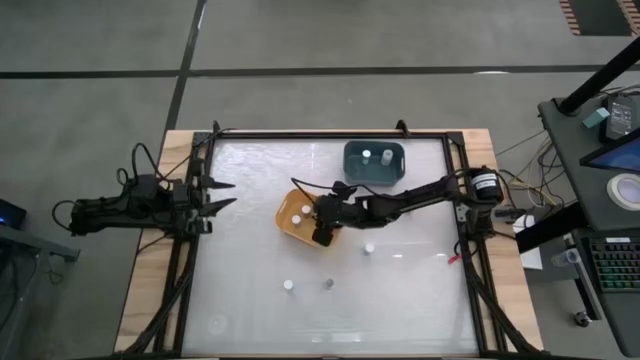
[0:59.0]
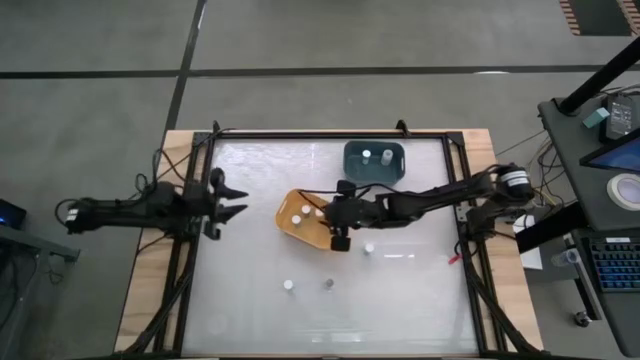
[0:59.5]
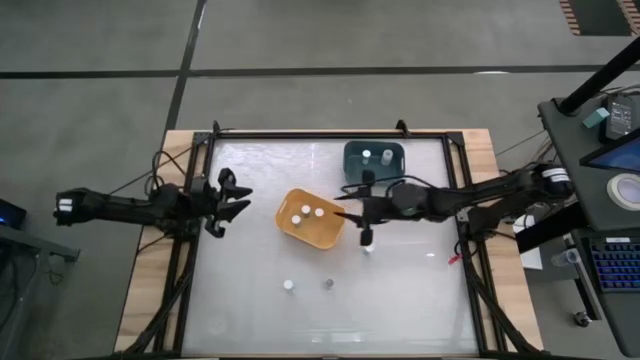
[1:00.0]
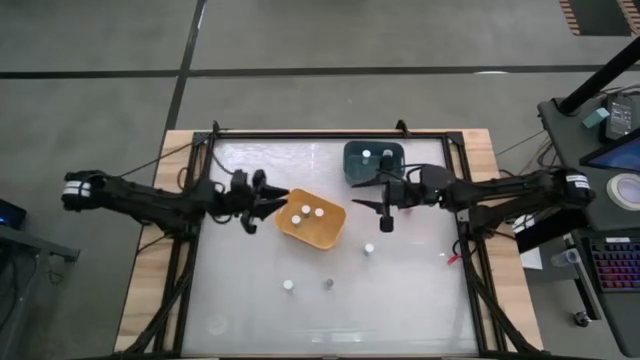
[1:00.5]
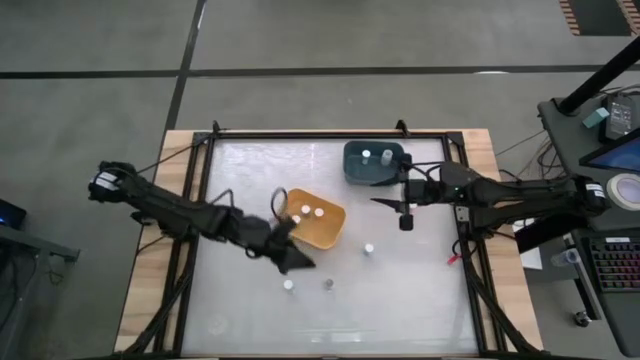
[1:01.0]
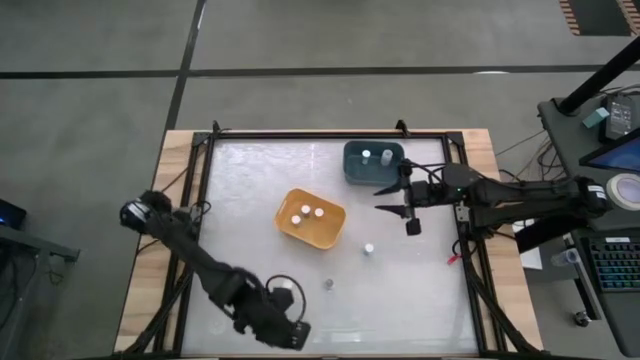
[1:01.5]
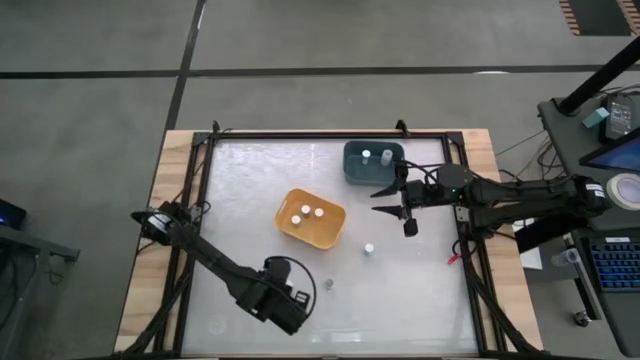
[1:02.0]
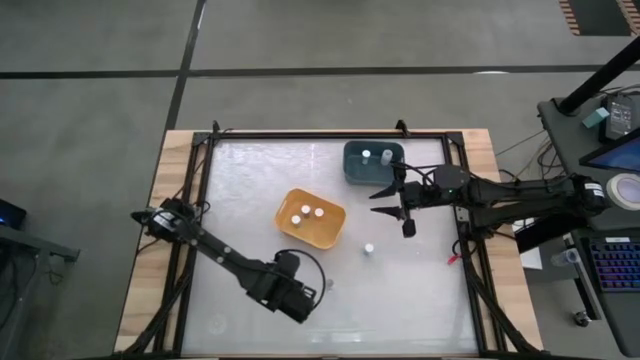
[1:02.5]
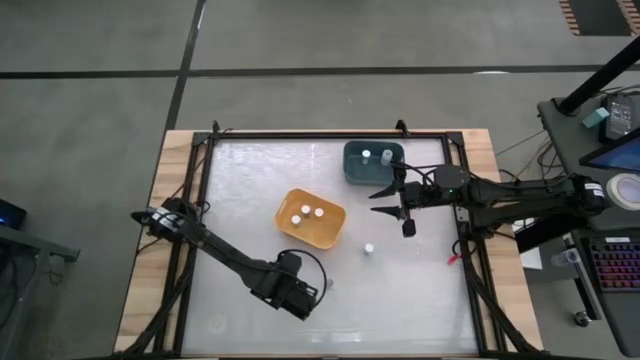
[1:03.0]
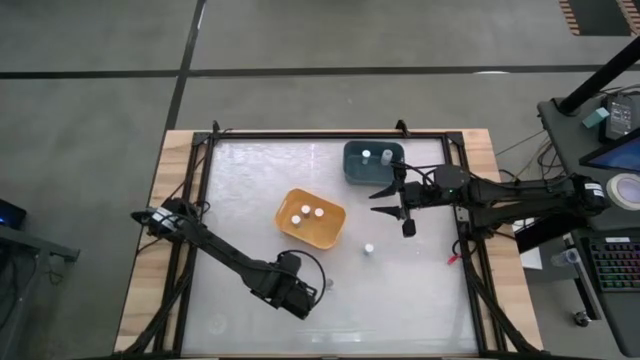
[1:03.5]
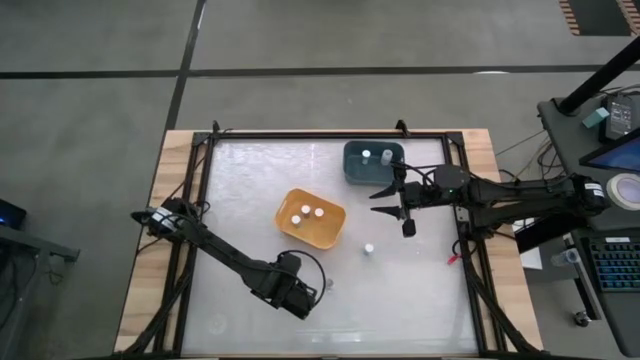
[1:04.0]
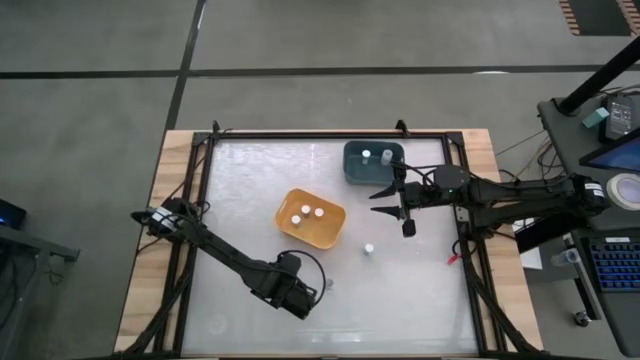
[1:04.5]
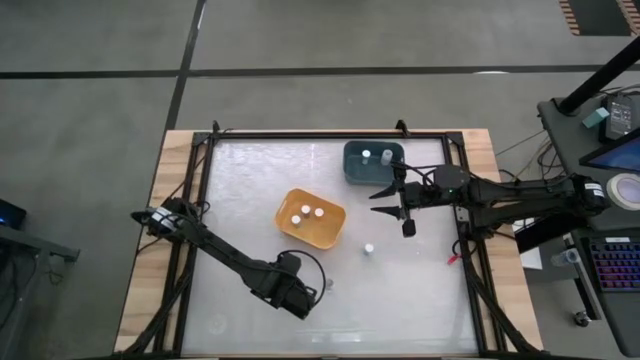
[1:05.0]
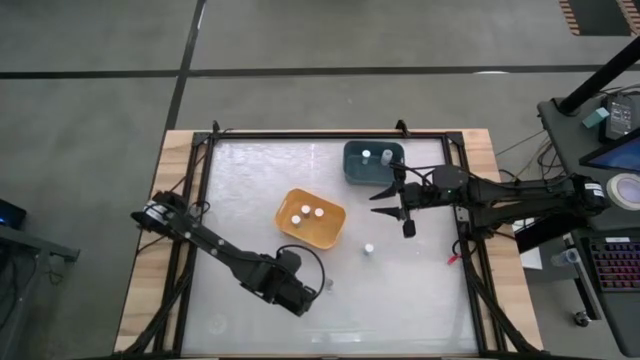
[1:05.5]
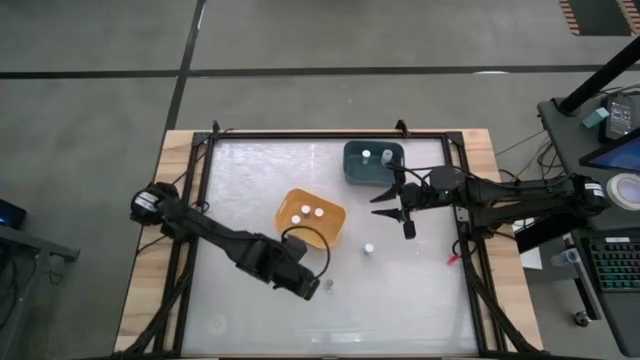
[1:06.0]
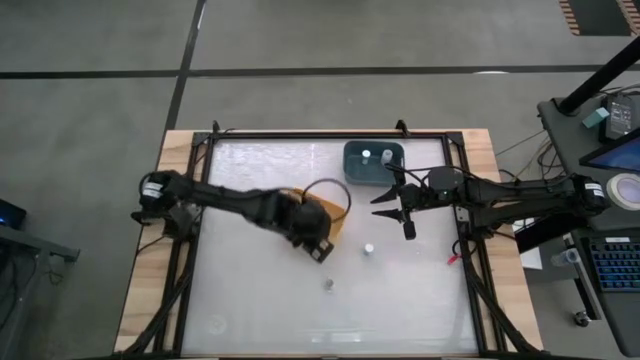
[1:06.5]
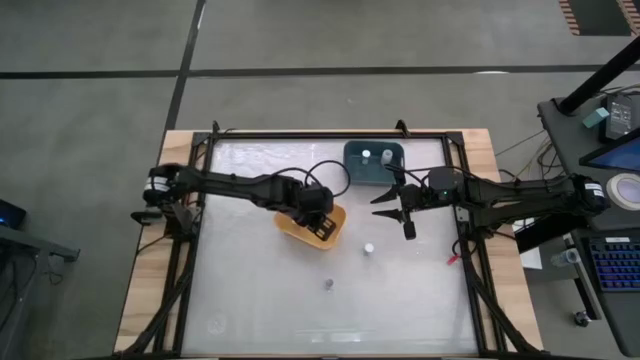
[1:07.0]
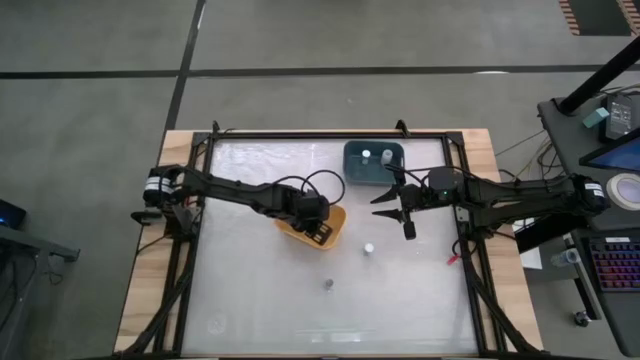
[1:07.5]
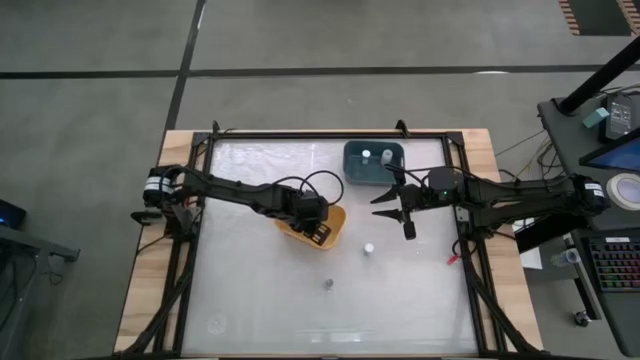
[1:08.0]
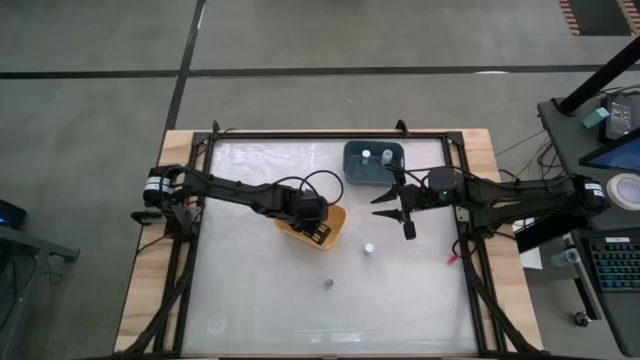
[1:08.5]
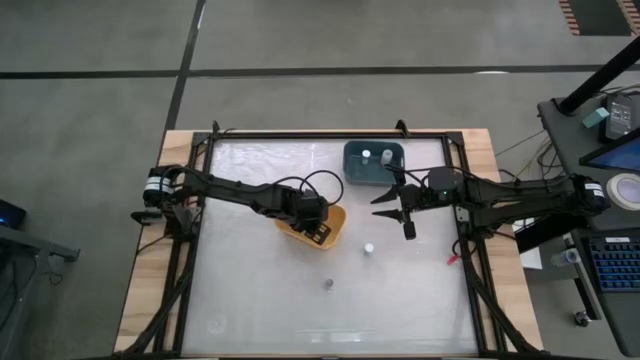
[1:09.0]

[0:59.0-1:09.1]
Task: Pick and place medicine bottles into bin by pill shape (circle, oval)
Put the blue pill bottle into the yellow bin

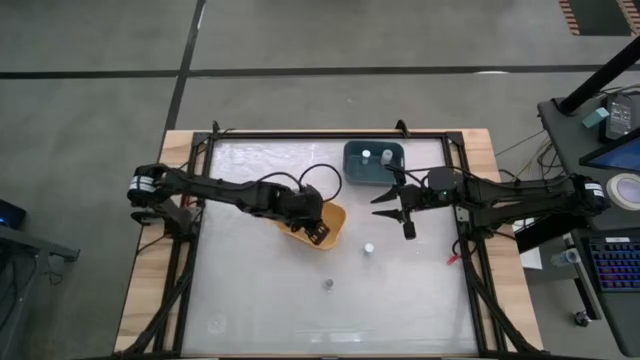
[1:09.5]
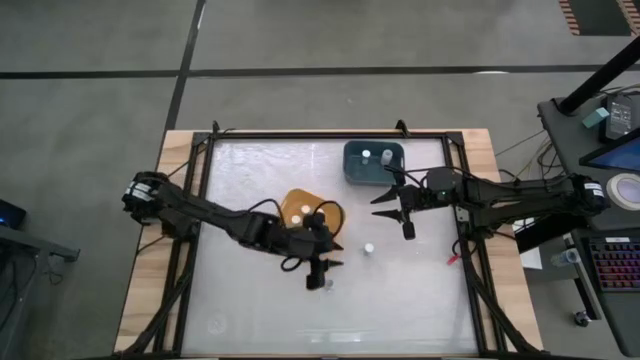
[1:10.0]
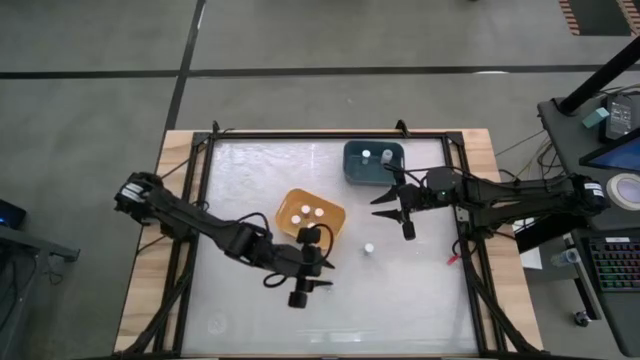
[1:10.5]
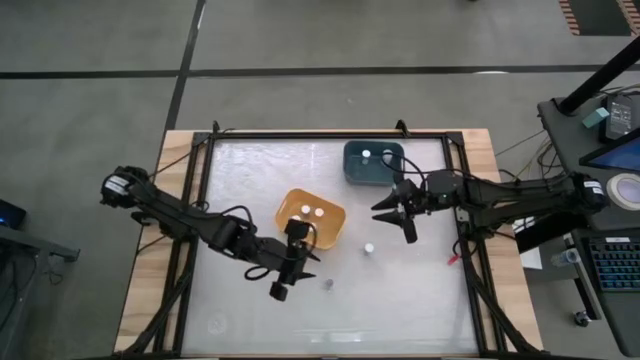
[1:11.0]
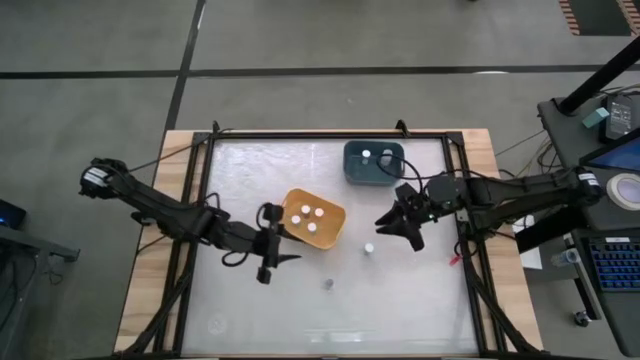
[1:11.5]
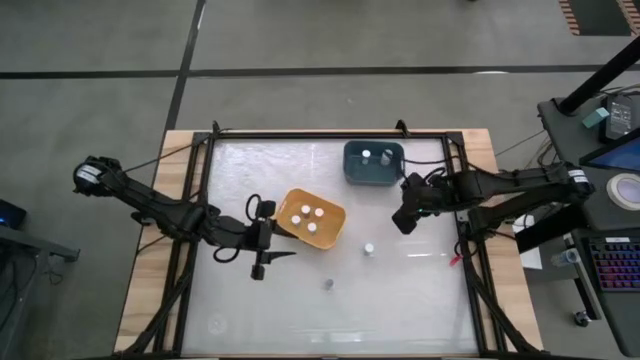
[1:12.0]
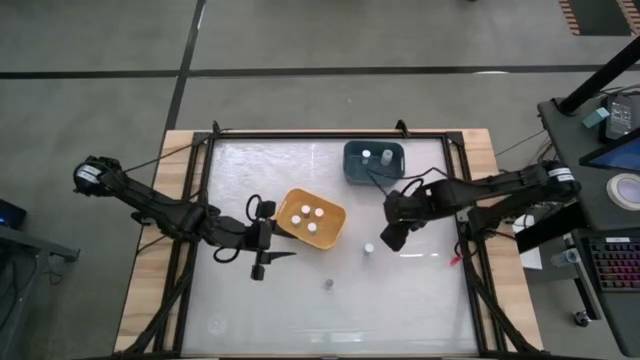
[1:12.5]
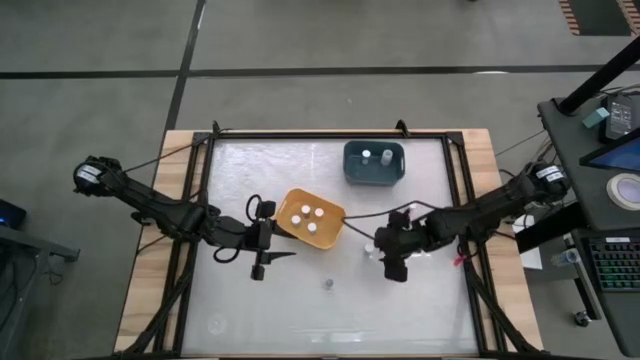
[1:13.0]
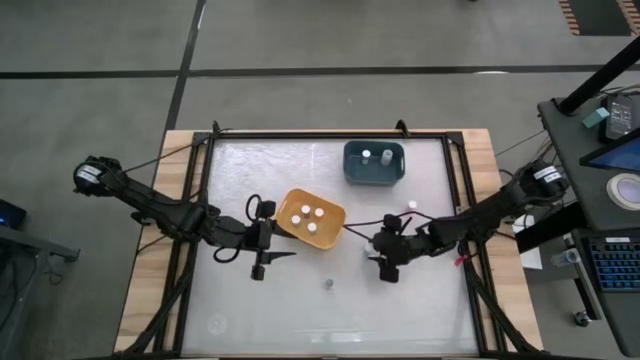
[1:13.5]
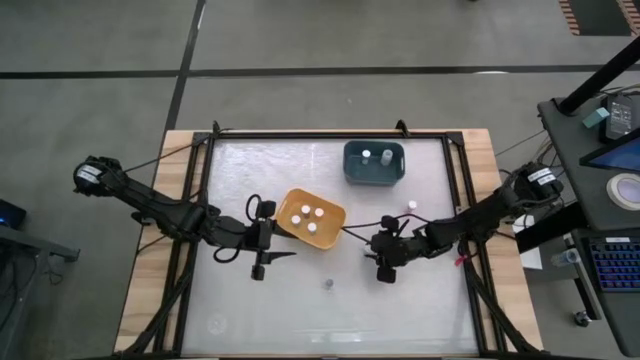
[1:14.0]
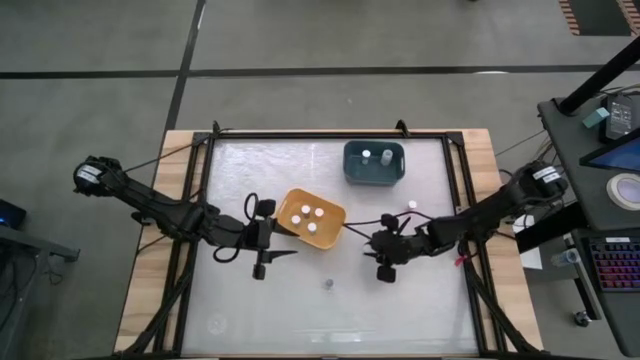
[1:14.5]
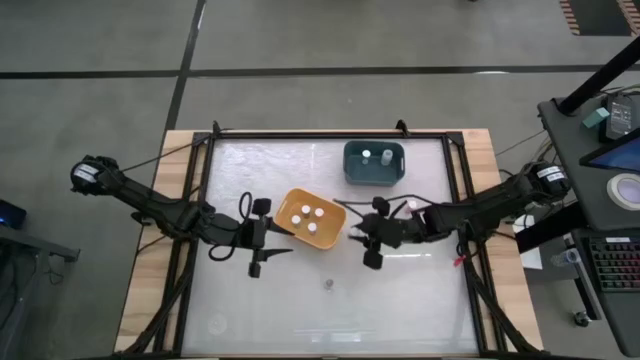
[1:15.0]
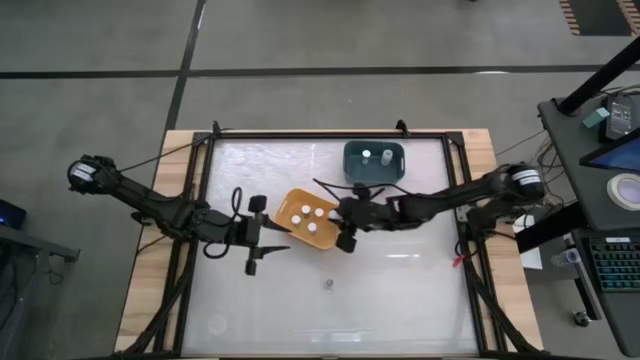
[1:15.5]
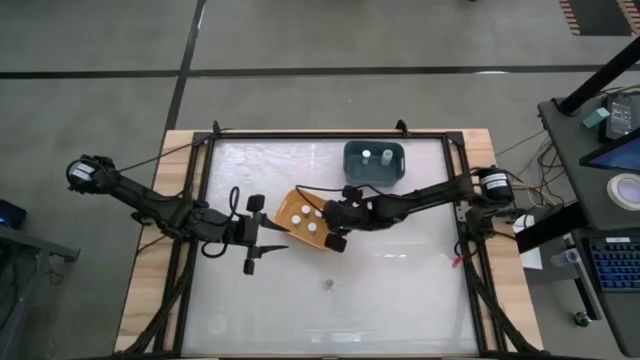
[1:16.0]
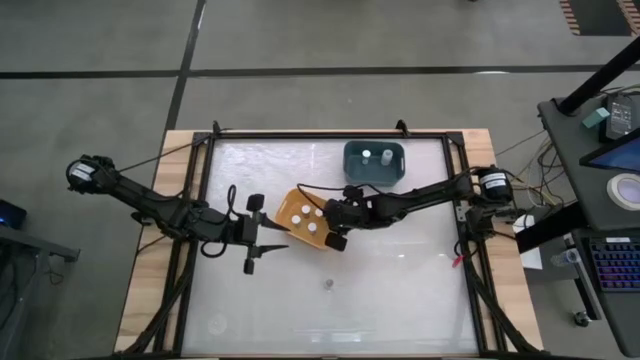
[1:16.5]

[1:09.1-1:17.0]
Put the blue pill bottle into the yellow bin

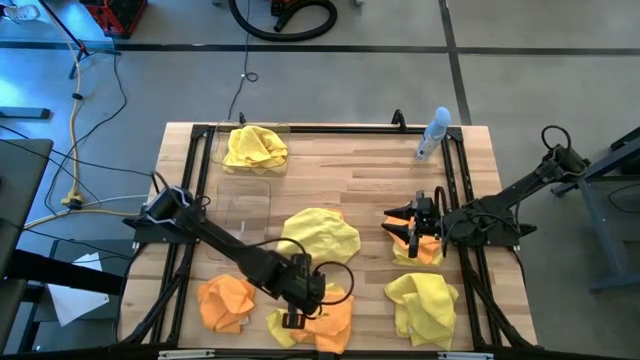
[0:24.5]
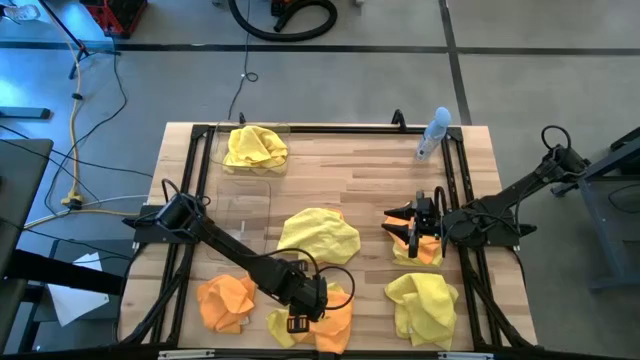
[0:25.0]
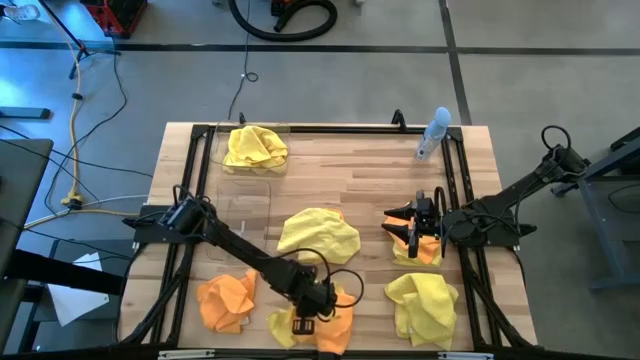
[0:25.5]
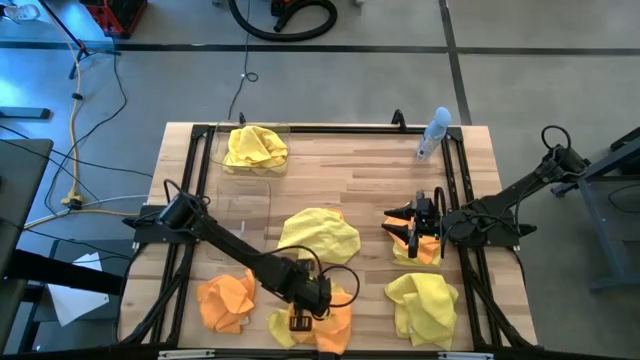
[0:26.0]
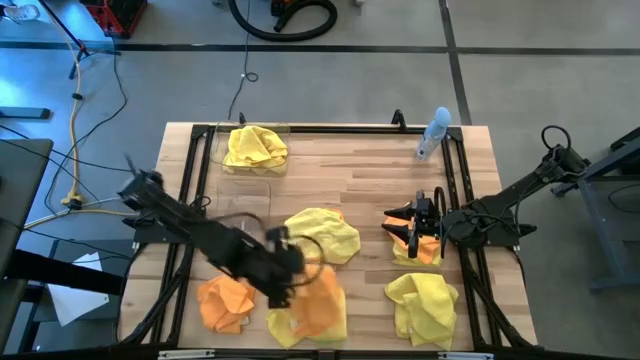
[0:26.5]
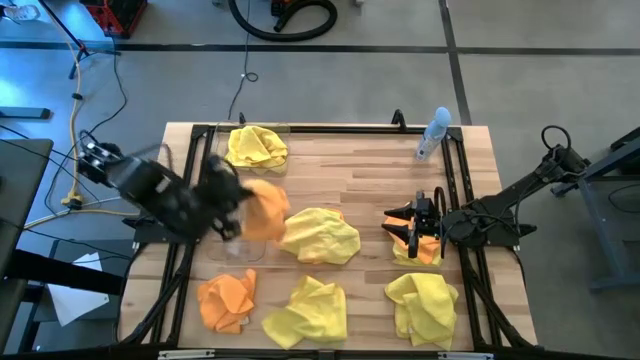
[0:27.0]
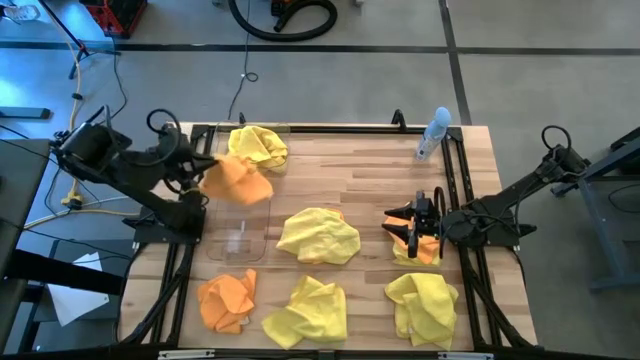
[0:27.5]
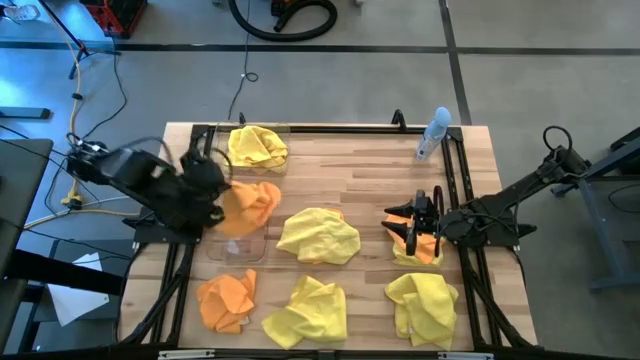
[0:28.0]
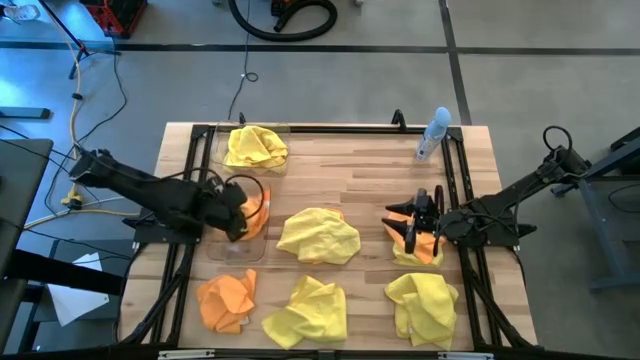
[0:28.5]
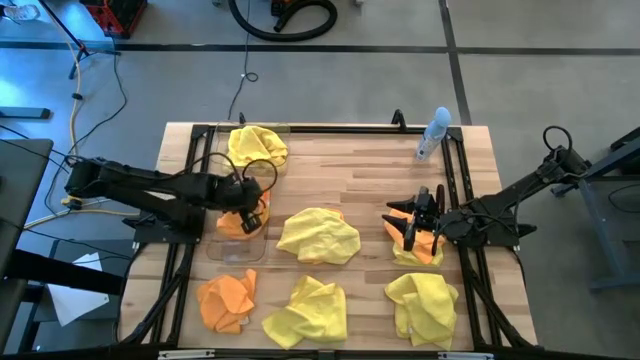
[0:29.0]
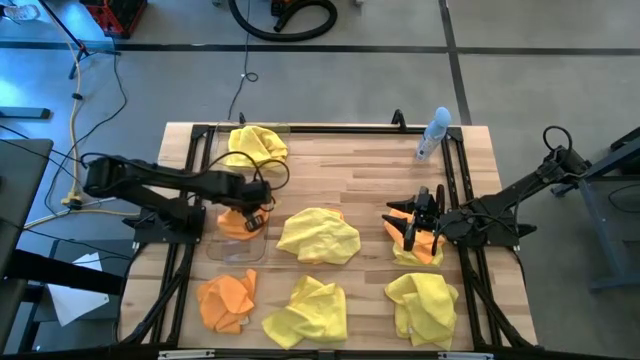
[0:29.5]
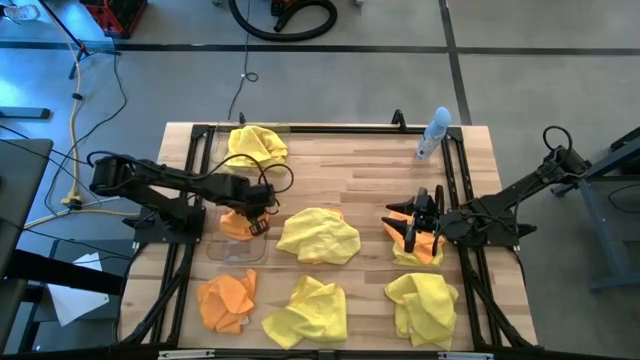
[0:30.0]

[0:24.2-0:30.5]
Task: Sort microfiber towel by color & place in baskets
Put the orange microfiber towel into the bottom transparent bin
